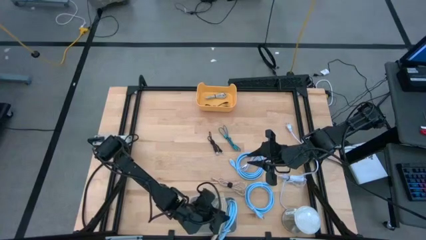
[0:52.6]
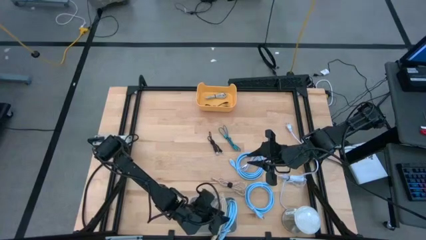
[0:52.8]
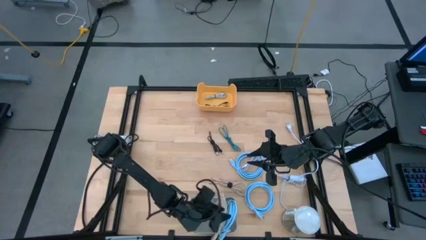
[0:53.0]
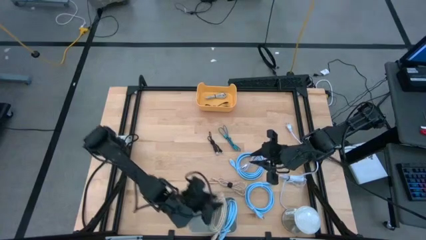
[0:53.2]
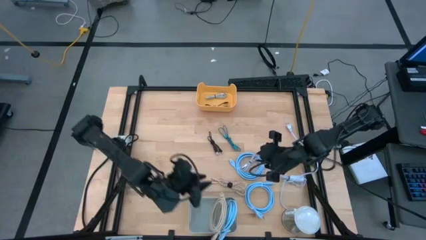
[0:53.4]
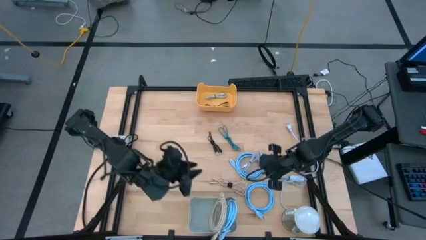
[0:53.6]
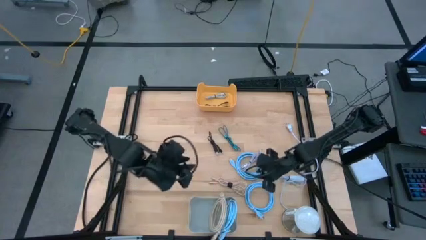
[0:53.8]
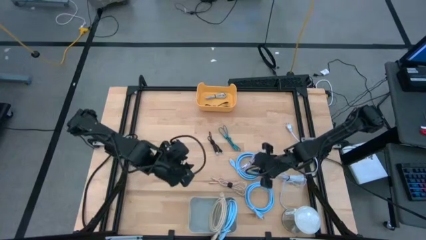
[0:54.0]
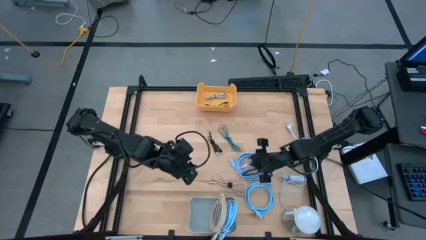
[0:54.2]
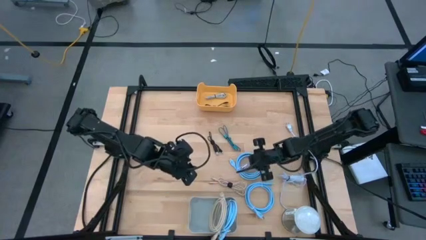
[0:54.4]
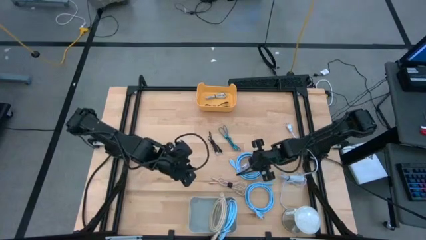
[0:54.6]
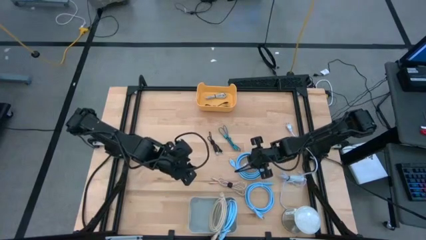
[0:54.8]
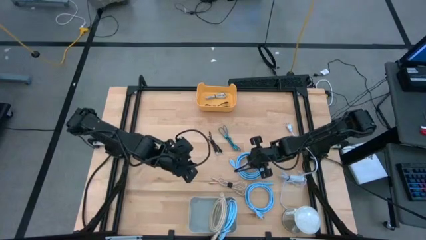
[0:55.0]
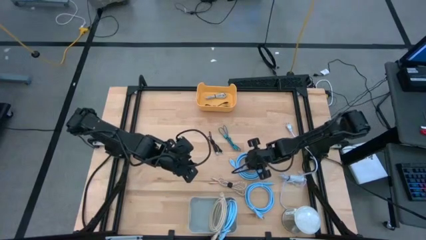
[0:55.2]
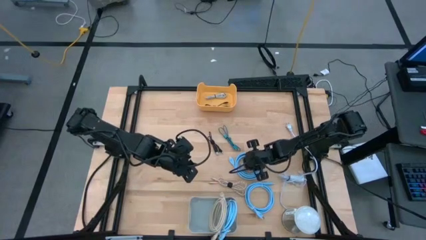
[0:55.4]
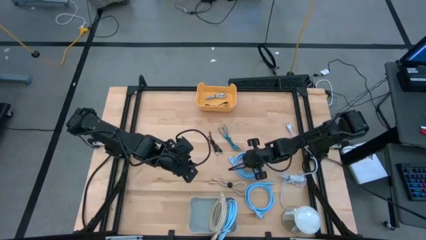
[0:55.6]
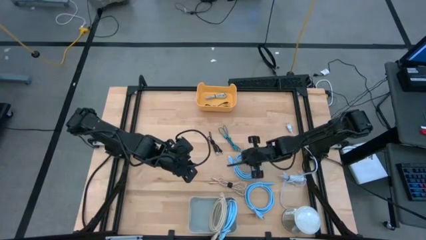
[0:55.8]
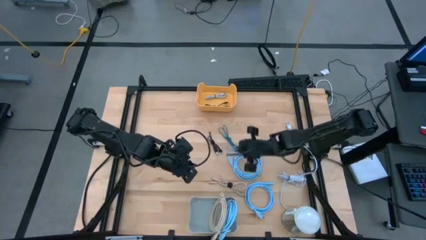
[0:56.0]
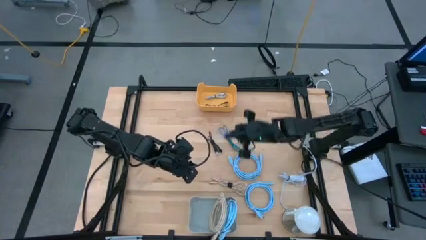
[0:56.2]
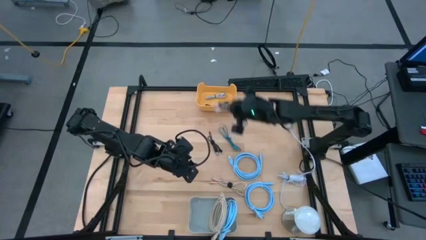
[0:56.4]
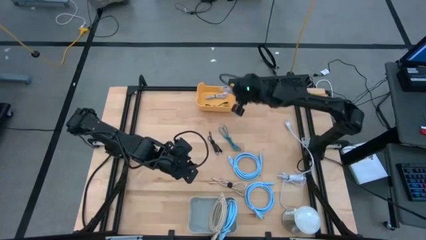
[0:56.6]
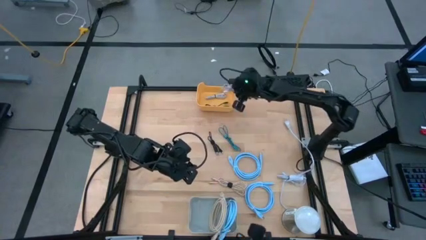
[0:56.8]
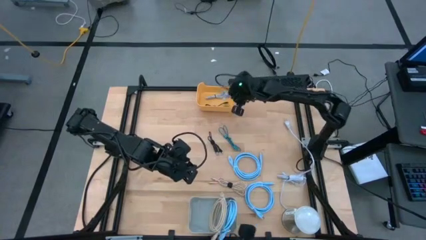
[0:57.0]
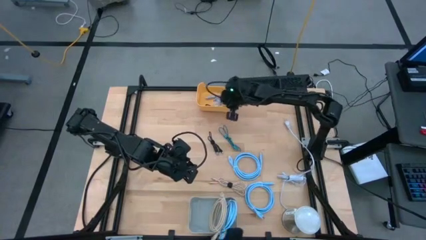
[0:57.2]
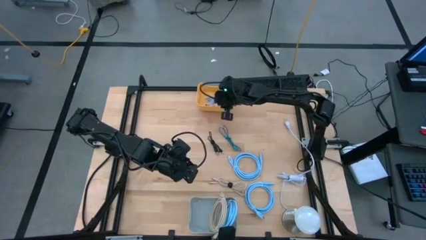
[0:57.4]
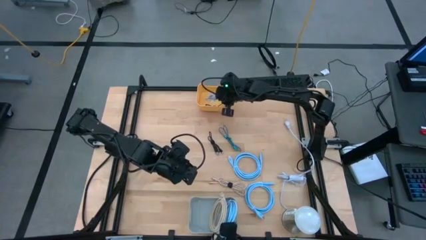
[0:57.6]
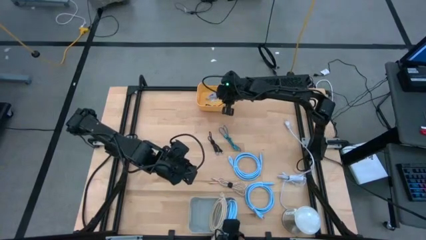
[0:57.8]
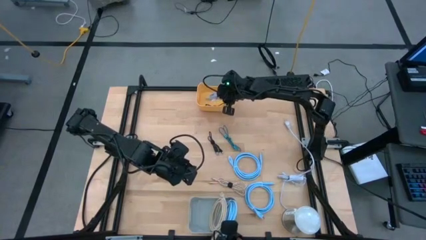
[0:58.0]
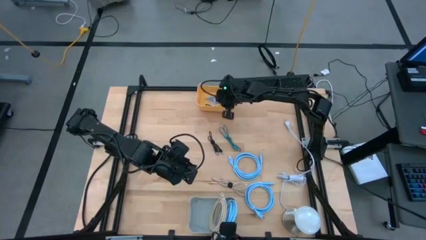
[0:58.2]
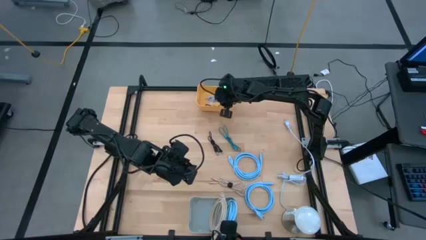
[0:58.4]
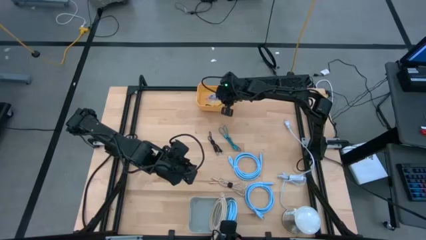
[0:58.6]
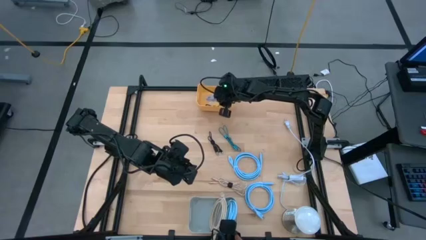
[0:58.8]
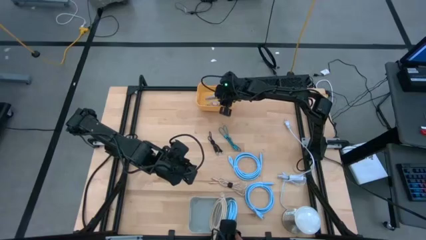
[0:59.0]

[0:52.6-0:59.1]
Task: Sort cables into bins
Put the light blue charger cable into the yellow bin

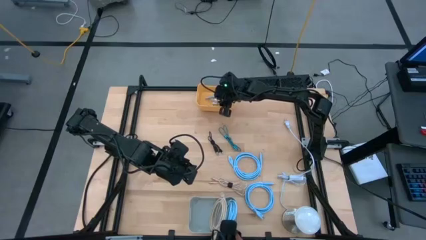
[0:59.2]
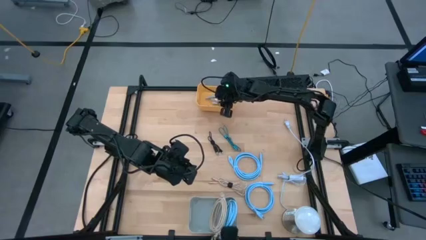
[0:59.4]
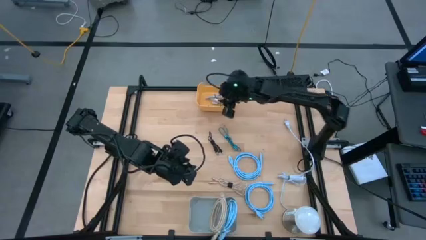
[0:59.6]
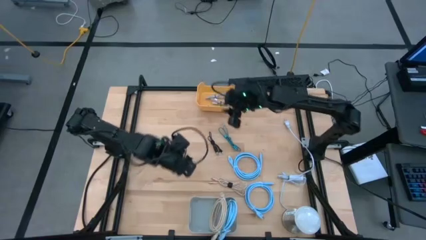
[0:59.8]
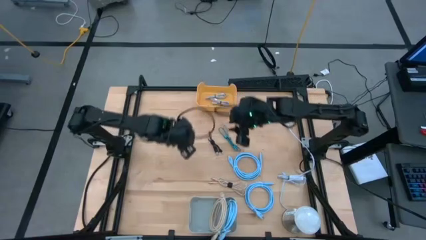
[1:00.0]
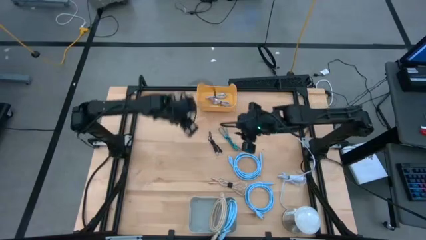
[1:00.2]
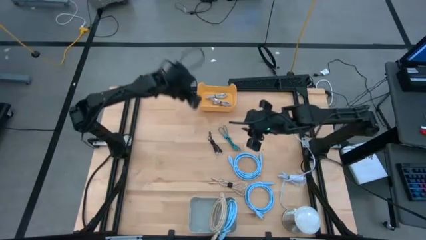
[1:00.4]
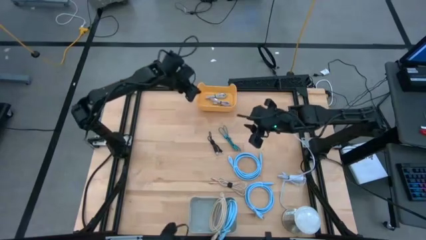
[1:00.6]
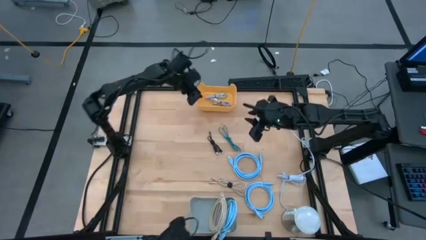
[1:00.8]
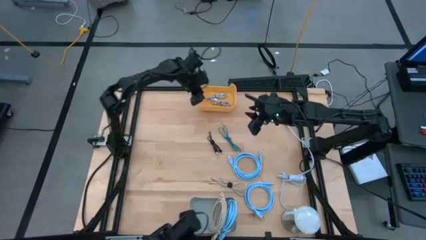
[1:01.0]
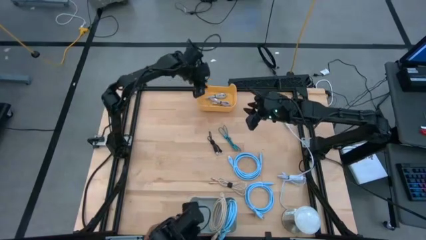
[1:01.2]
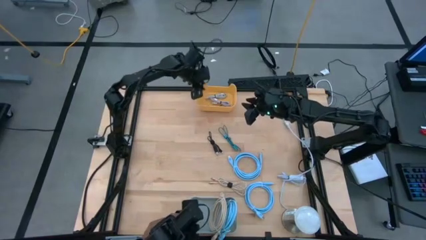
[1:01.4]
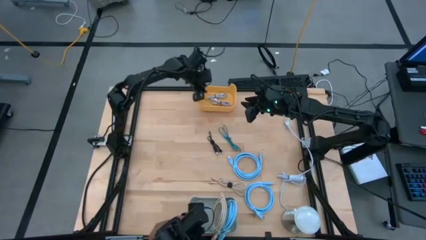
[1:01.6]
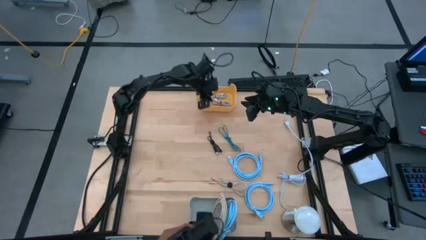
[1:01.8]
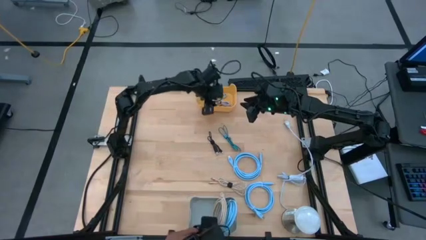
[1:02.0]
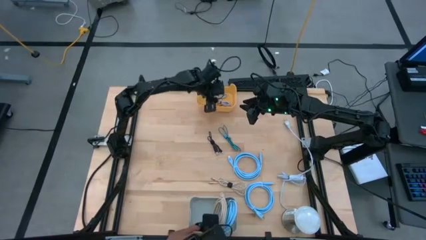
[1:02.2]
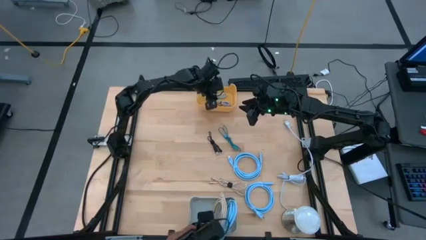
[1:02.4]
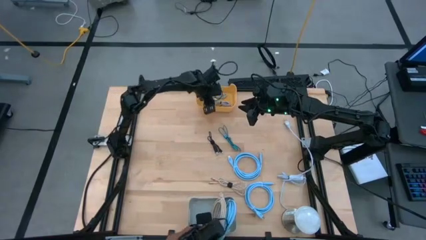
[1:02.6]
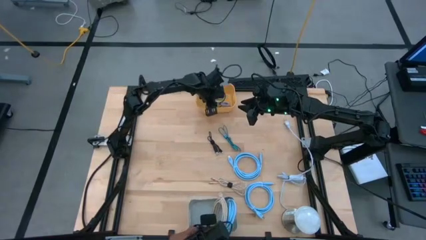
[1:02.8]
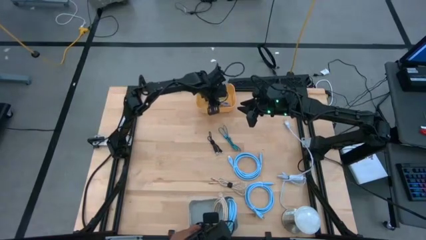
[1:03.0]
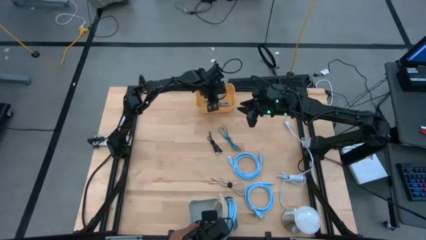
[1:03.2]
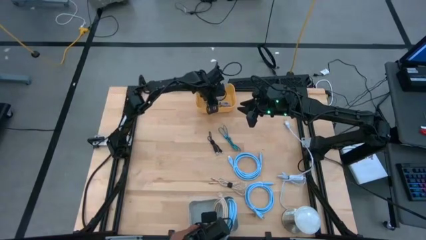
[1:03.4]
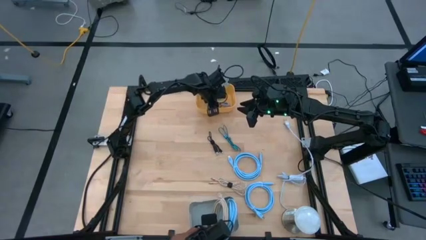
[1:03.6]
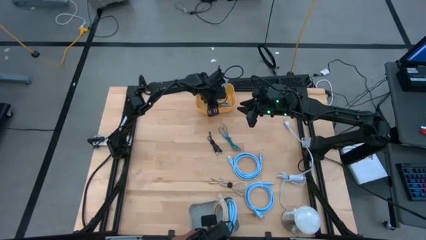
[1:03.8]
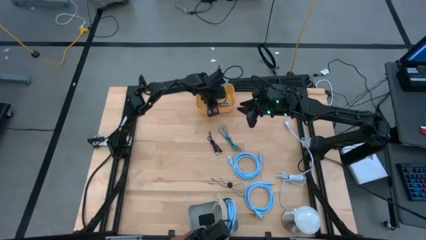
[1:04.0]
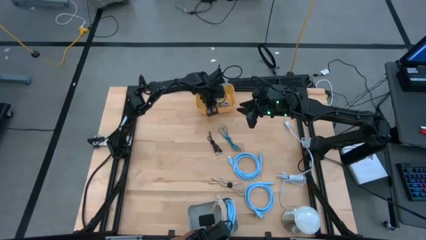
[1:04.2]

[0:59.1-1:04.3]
Adjust the yellow bin

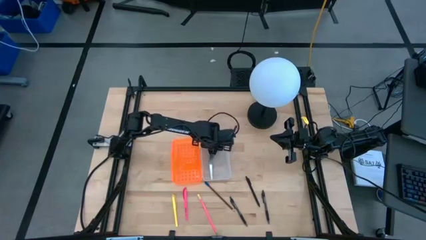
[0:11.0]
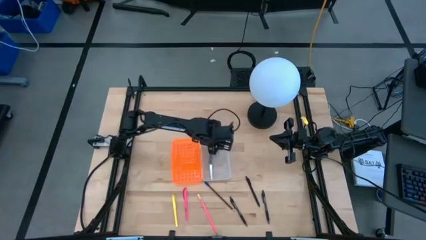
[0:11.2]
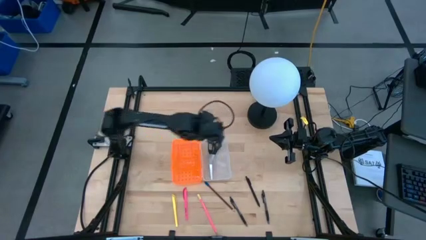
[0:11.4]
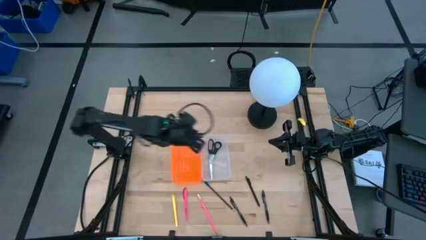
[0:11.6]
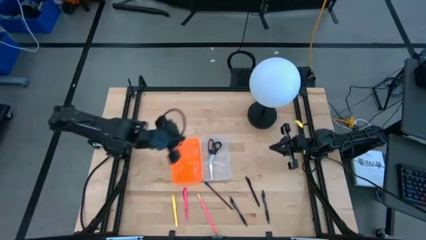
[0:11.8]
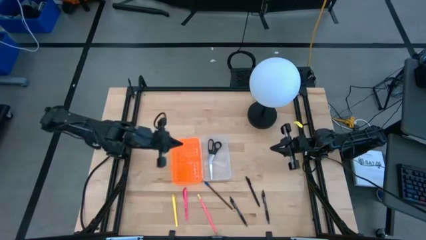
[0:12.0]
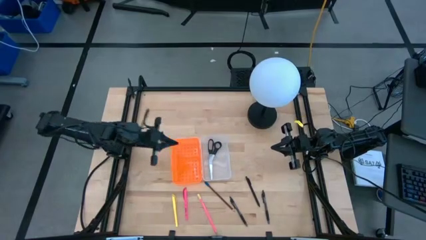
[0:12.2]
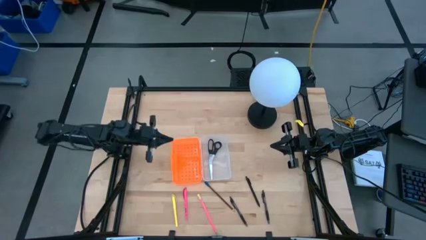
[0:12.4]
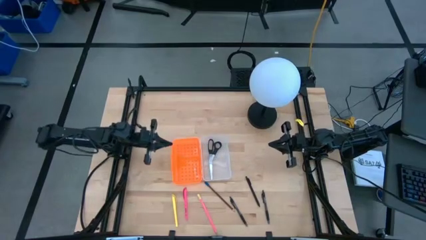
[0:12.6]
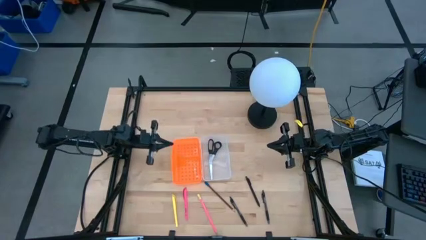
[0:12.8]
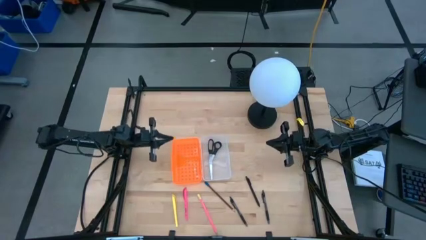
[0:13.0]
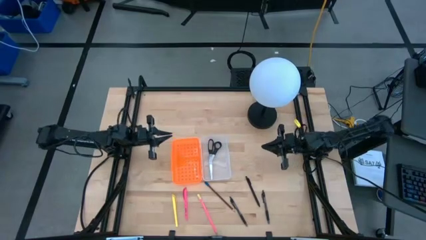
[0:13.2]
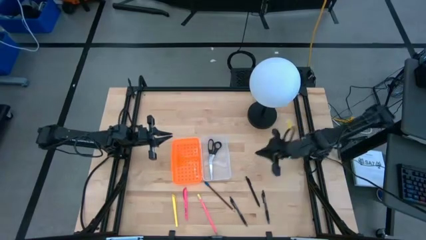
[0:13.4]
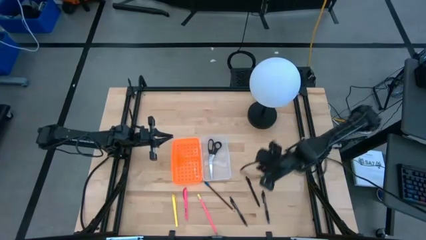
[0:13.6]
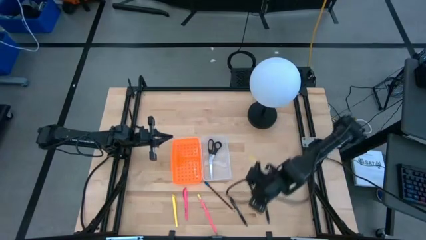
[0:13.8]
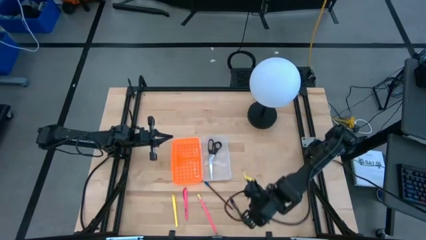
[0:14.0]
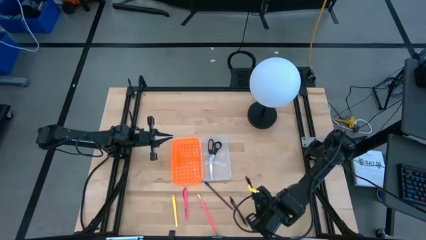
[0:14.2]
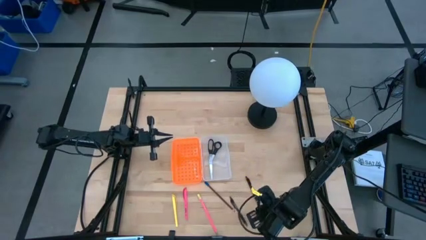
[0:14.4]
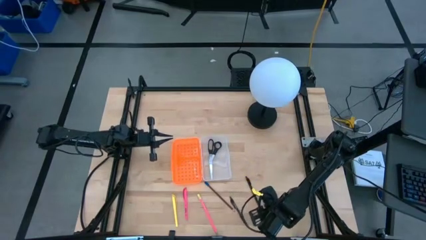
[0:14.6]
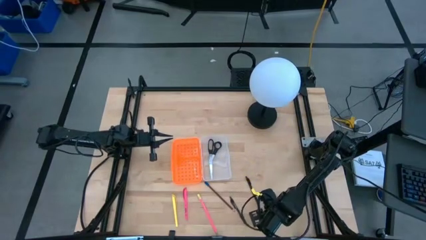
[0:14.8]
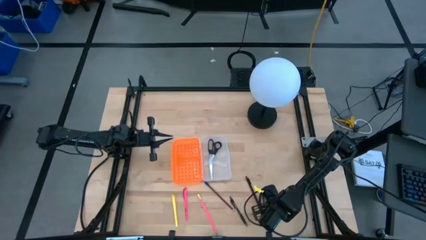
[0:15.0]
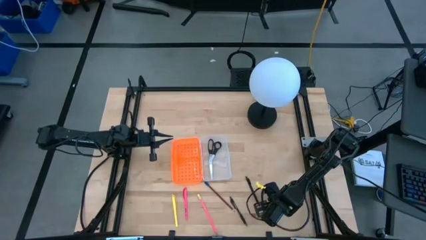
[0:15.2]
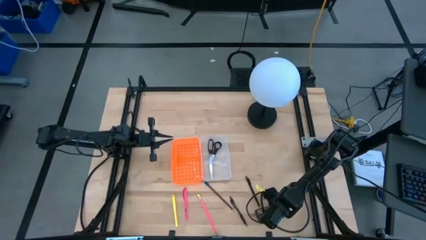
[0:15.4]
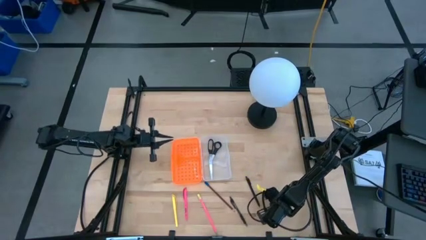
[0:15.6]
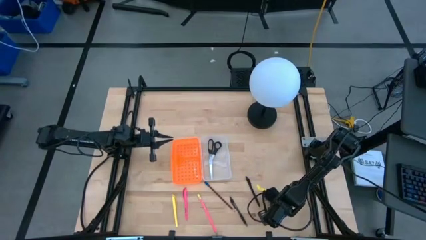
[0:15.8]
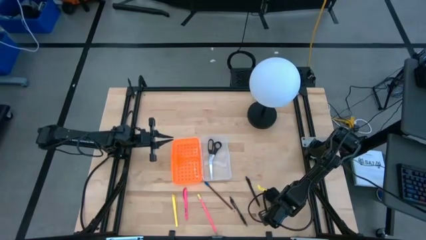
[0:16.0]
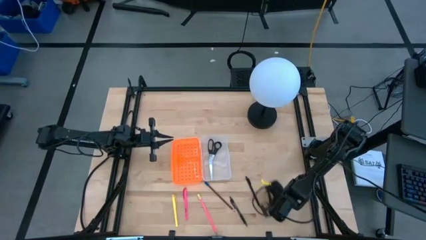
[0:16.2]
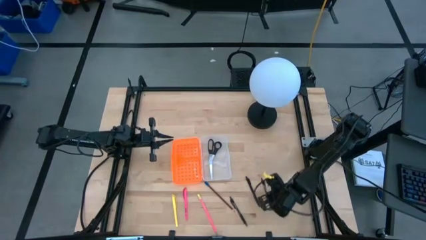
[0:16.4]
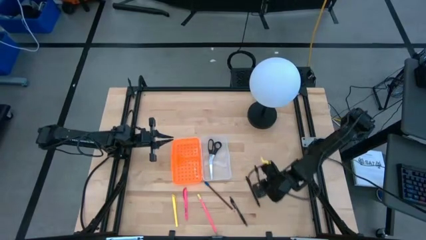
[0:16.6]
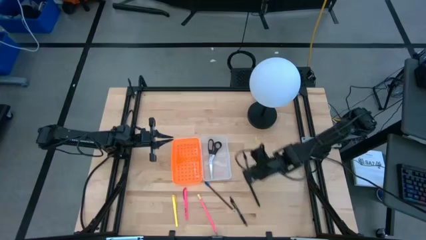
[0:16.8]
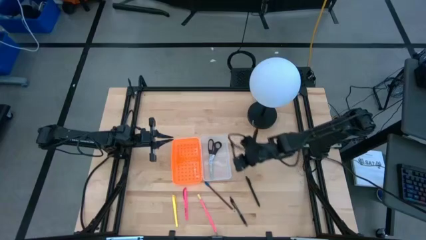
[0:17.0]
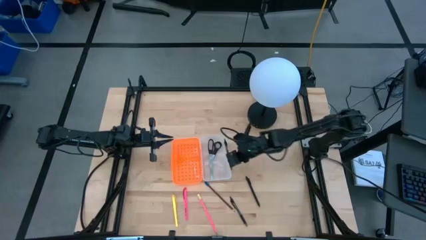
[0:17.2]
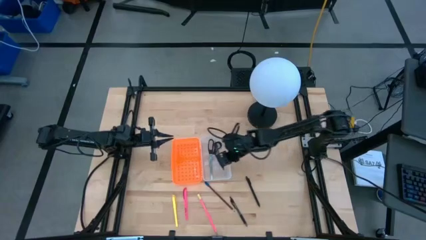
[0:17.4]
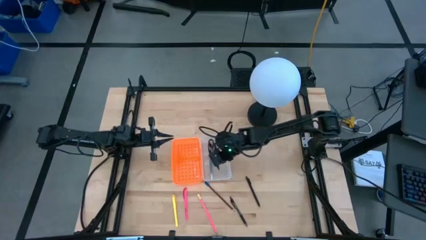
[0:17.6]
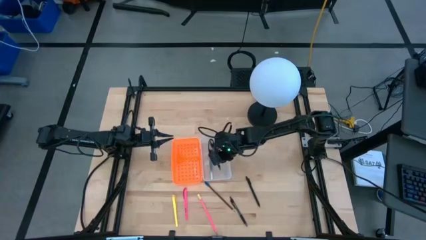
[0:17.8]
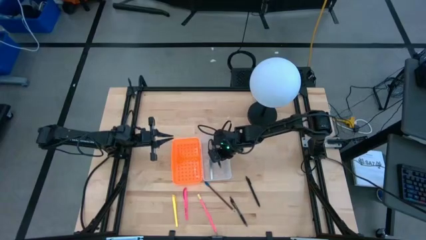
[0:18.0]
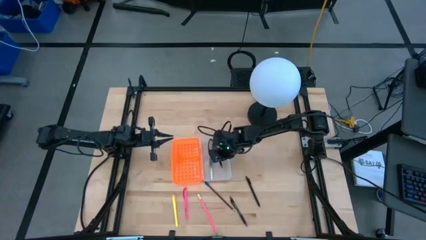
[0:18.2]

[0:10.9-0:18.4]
Task: Pick & place school supplies into a supply box
Put the bottom pen into the supply box
